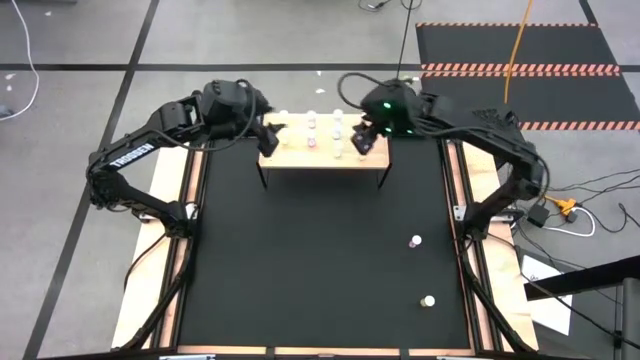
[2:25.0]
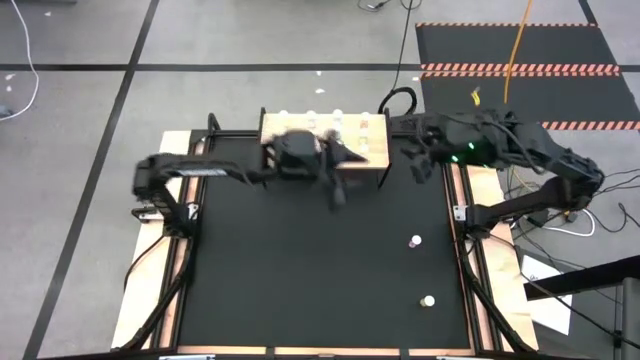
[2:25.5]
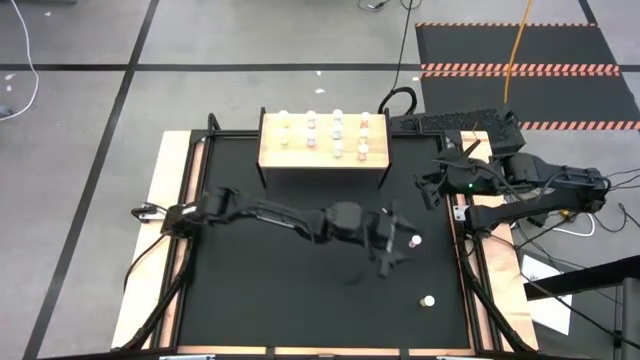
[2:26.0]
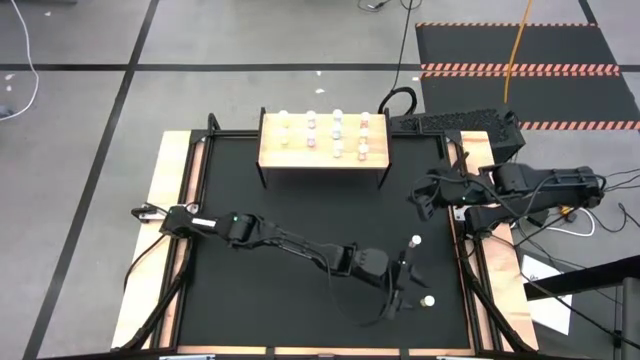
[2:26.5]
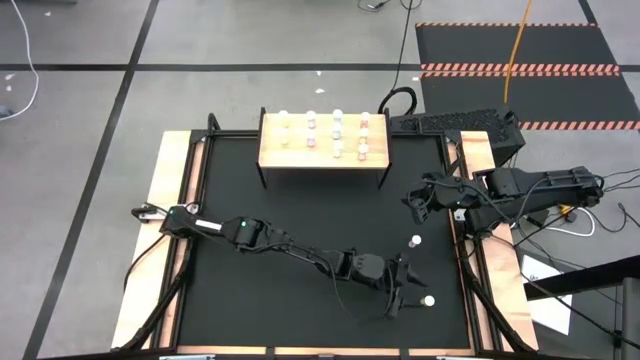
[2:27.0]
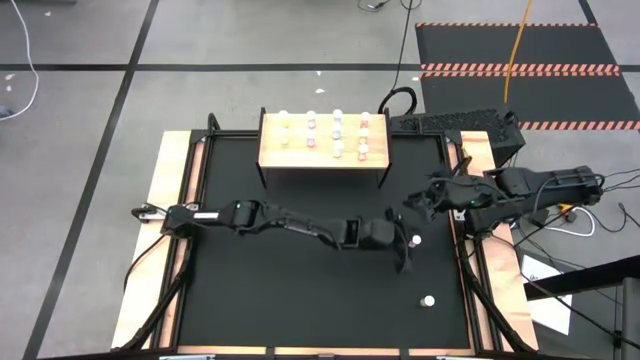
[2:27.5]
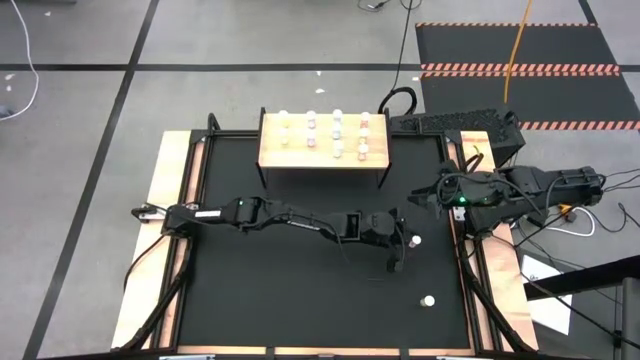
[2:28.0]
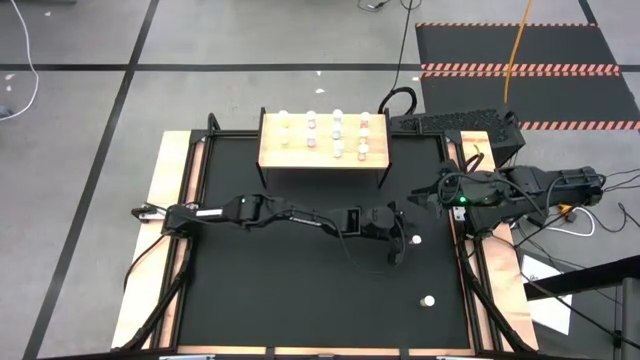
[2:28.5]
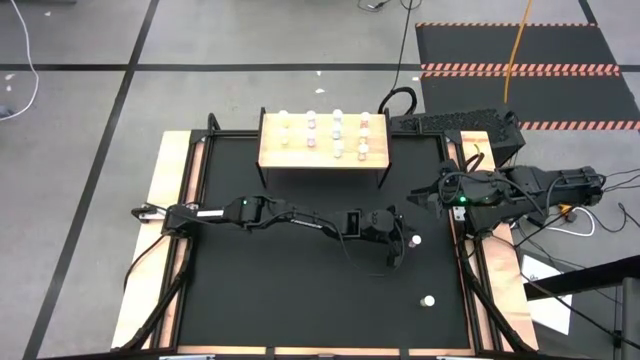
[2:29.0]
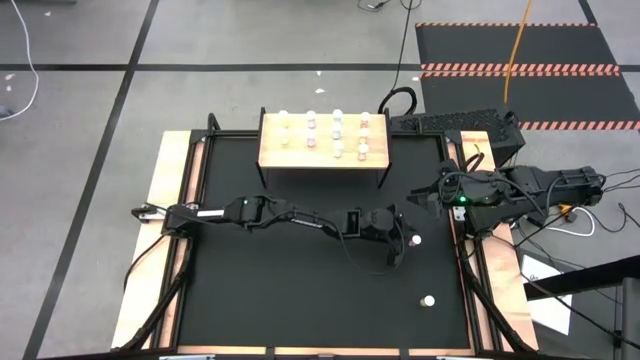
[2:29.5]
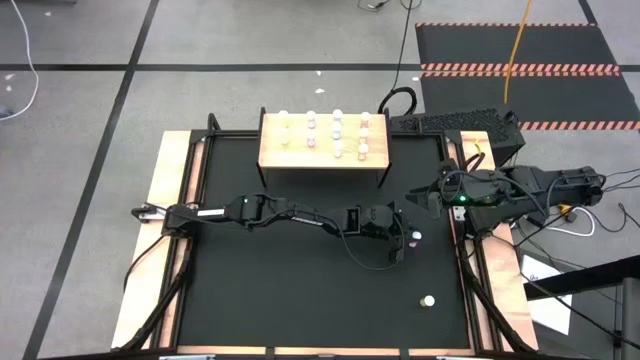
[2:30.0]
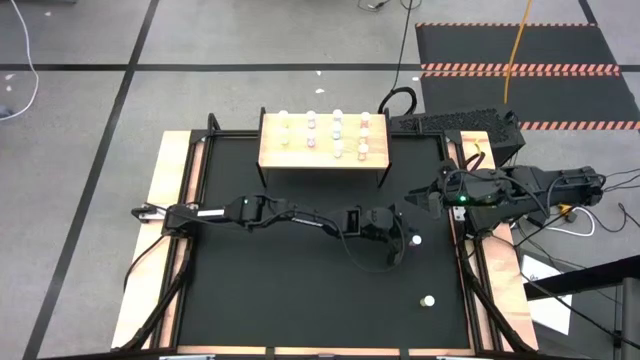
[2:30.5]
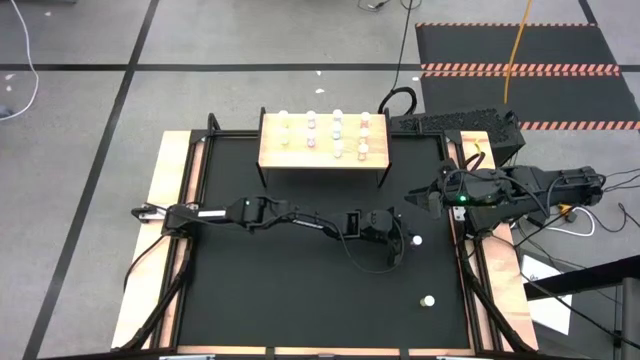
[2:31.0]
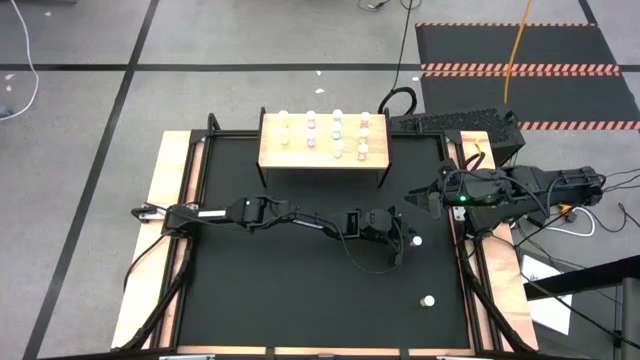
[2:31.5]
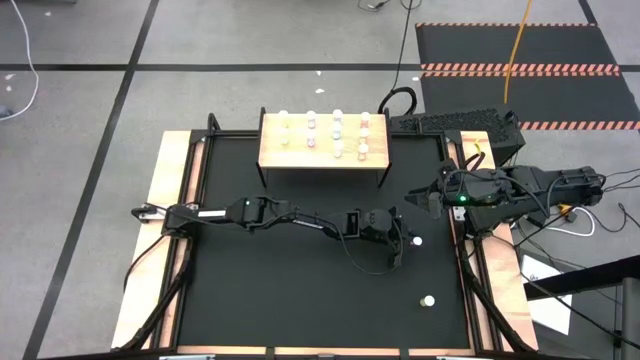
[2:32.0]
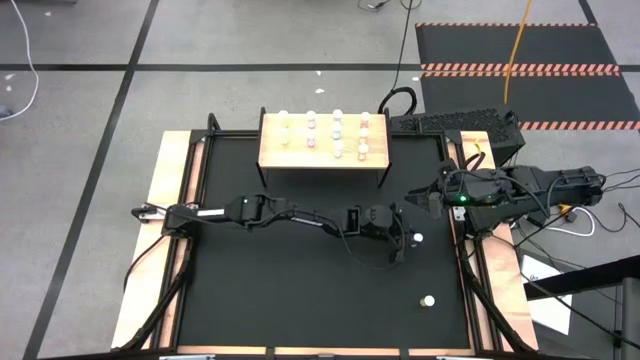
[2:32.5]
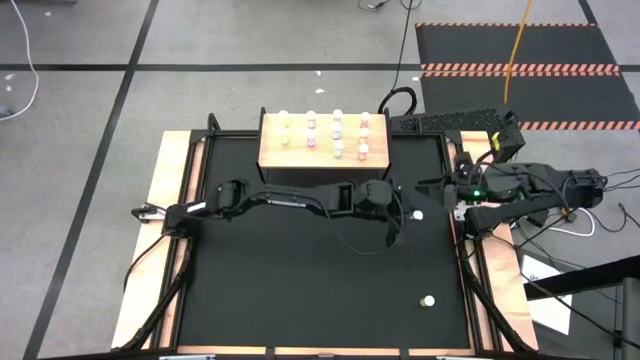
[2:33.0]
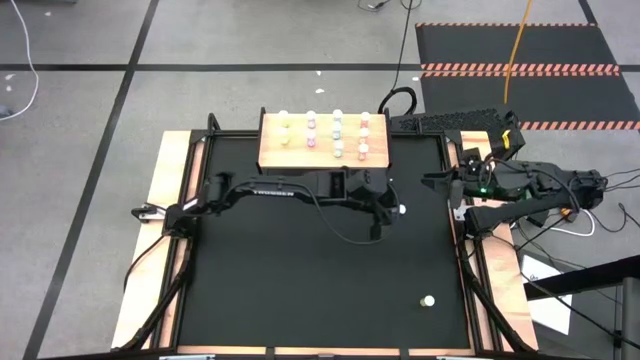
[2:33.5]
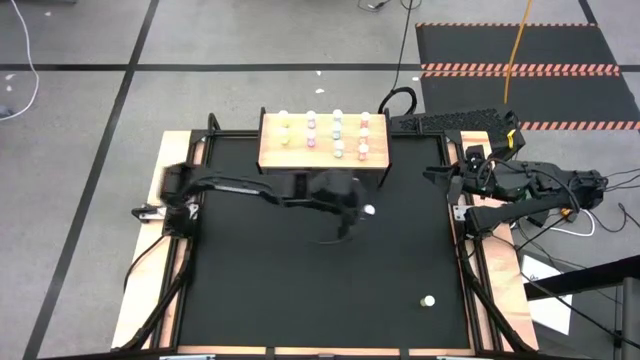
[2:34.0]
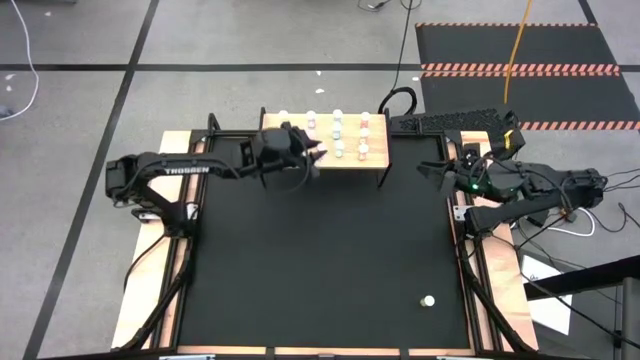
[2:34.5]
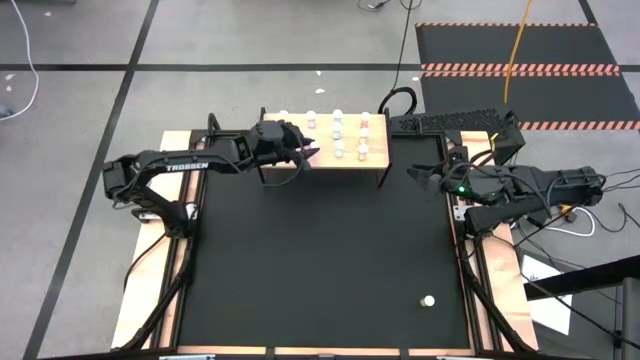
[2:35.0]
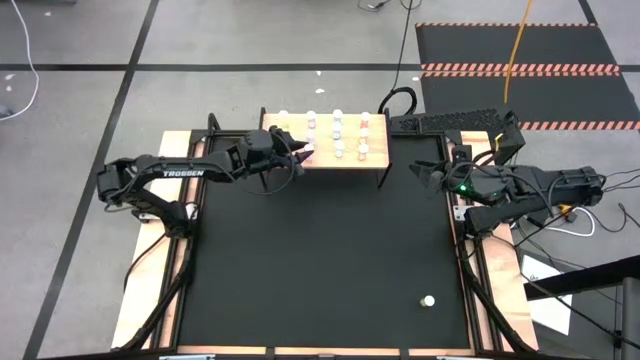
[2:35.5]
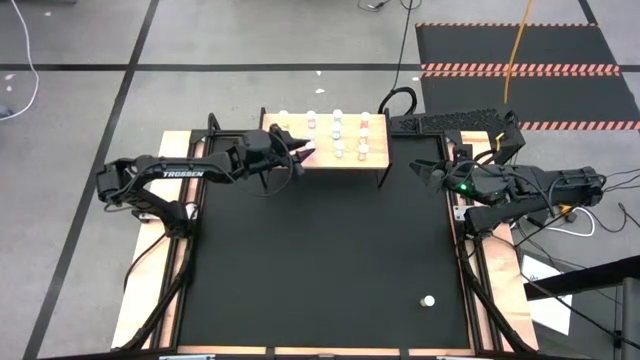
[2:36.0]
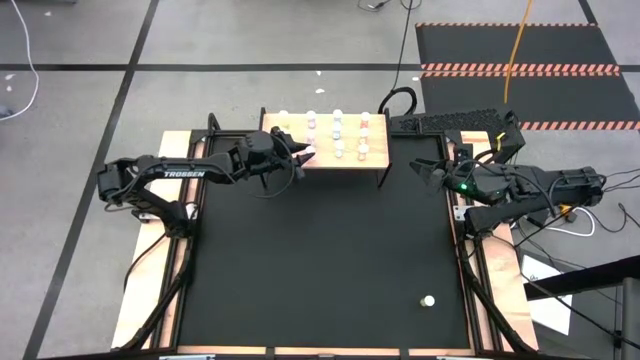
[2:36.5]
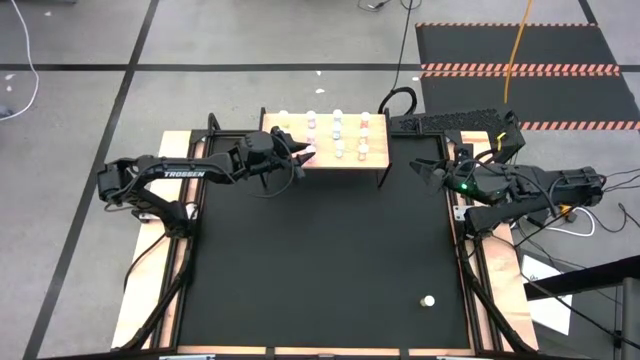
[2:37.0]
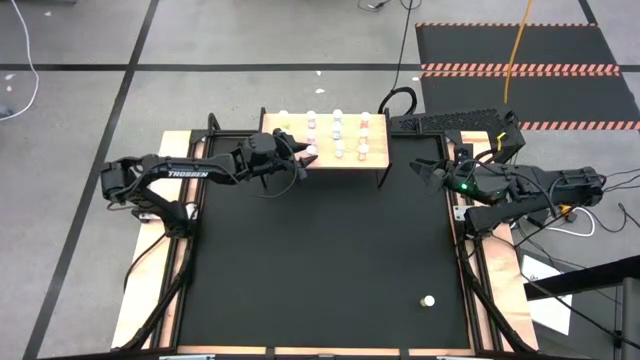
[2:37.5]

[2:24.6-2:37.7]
Task: Pick and place medicine bottles onto shelf by color
Put the pink pill bottle on the shelf aligned with the other pink bottles

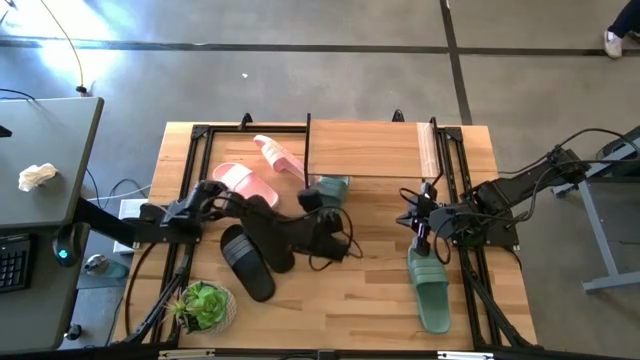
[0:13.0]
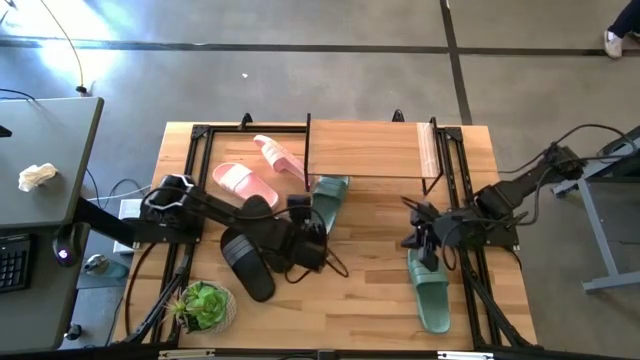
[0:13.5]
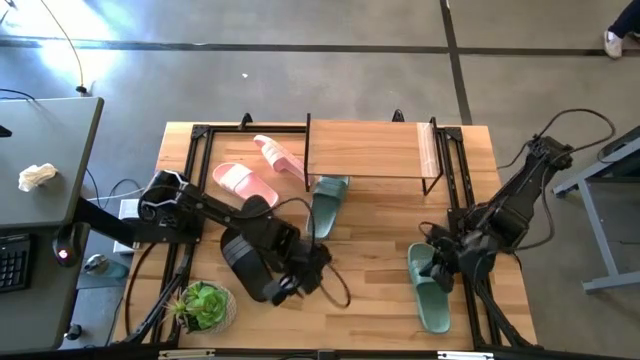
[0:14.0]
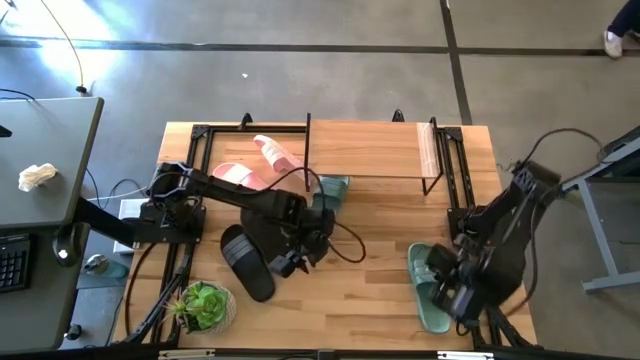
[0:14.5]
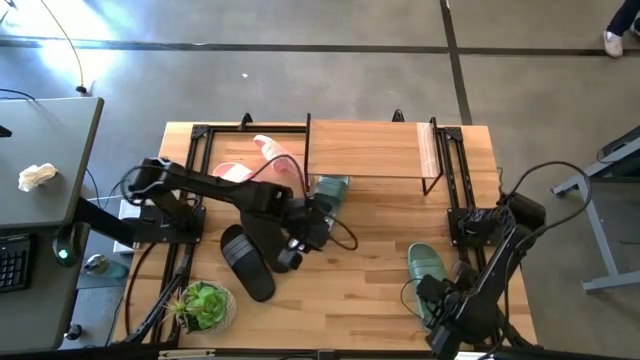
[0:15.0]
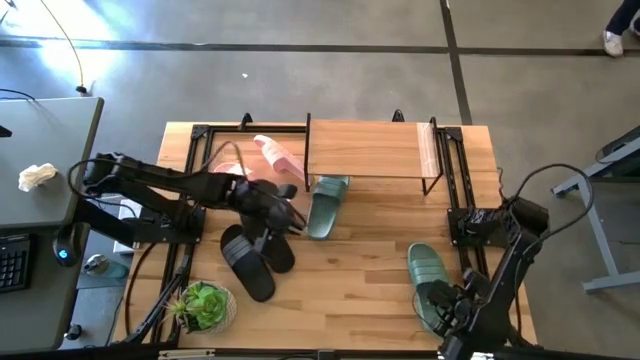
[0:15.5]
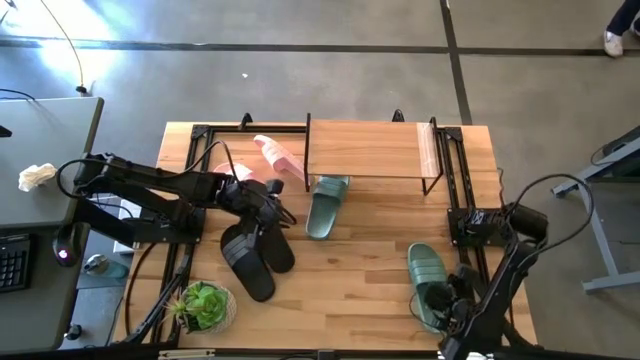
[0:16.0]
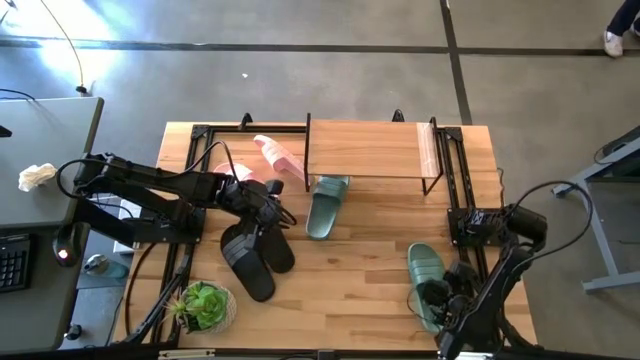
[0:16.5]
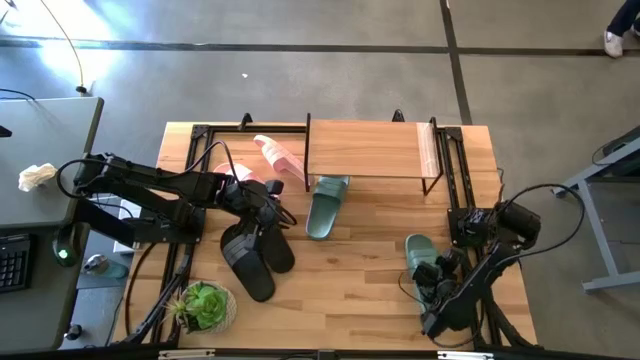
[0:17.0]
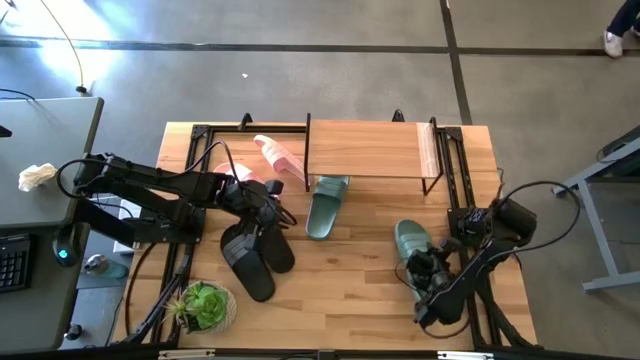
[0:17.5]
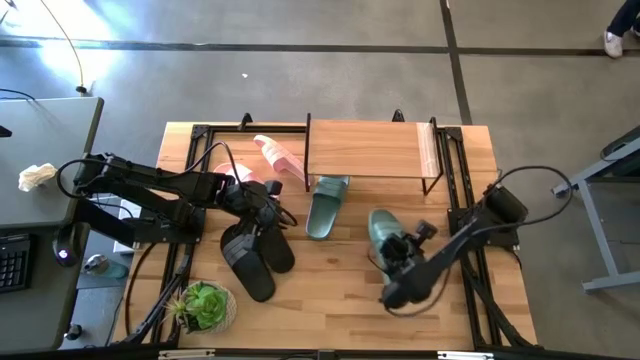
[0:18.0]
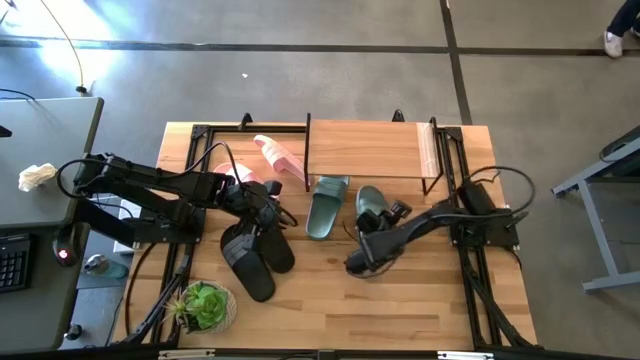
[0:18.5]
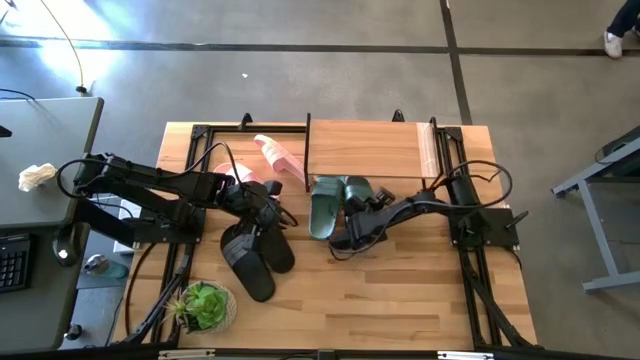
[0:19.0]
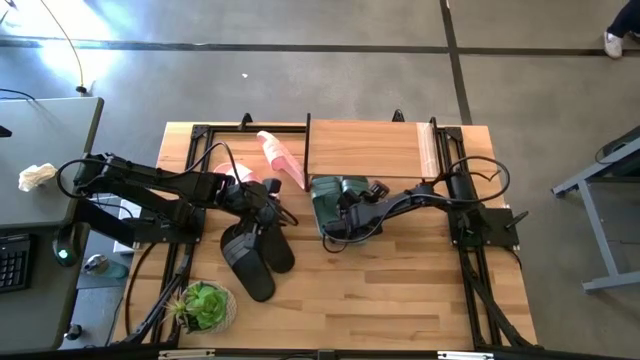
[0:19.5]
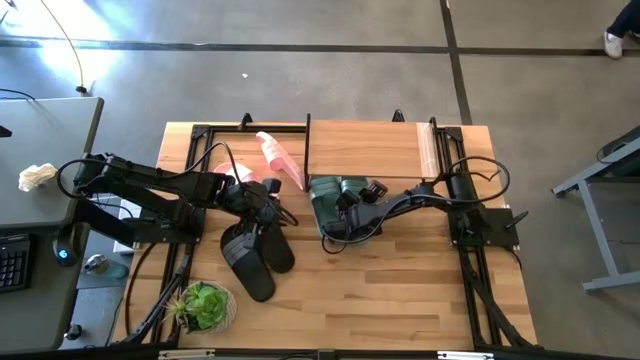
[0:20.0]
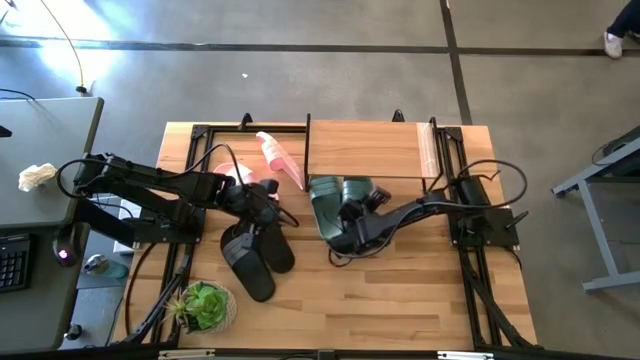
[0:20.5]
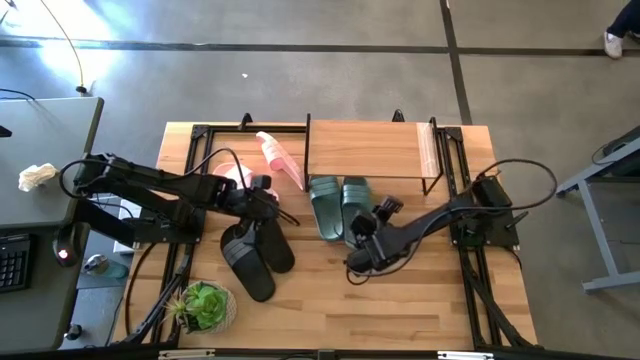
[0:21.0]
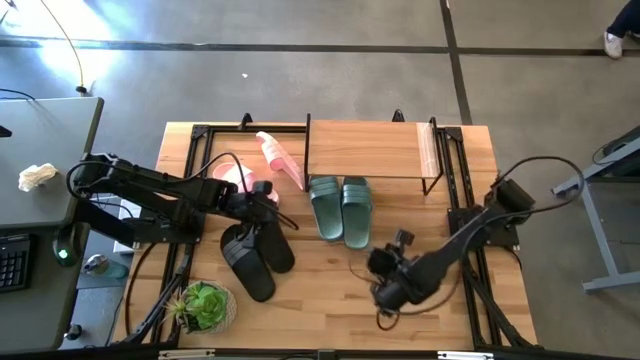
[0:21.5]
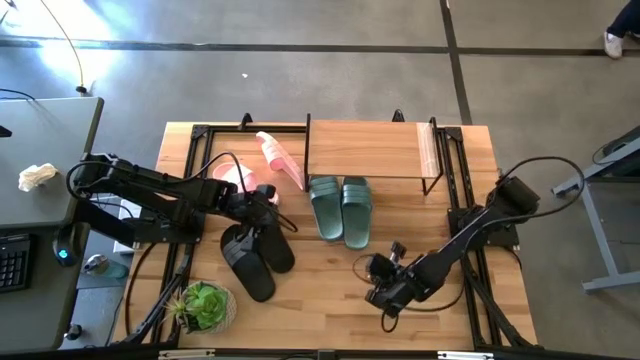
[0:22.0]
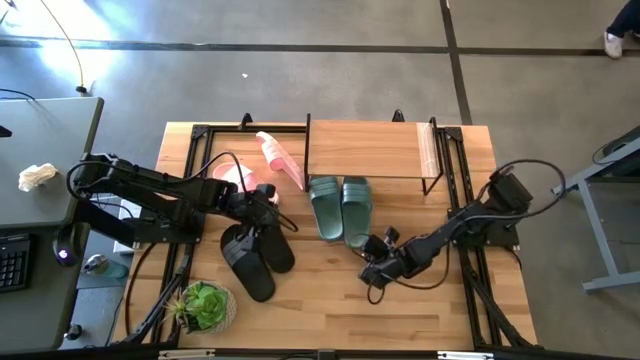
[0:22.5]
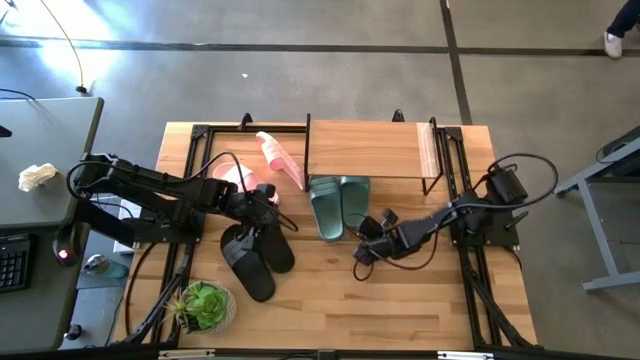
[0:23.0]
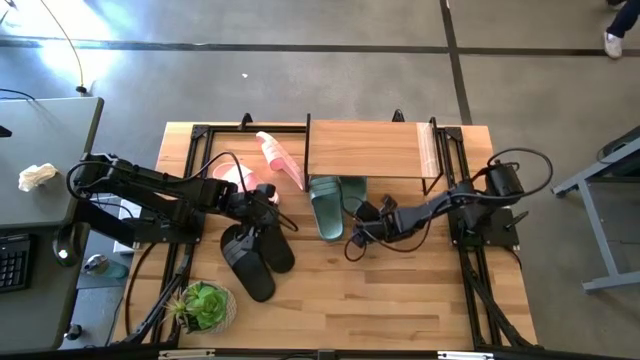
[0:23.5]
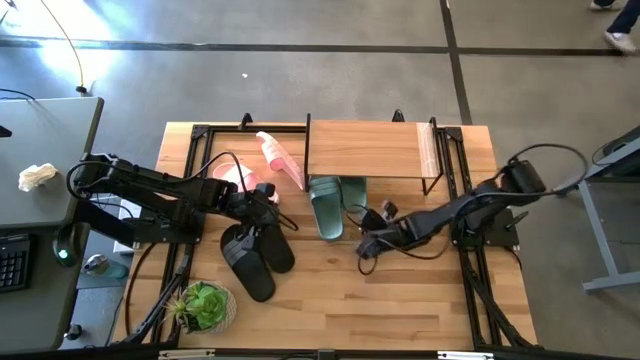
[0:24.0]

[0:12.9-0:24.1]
Task: Pick and place slides into the shelf
Put the green slide under the shelf
